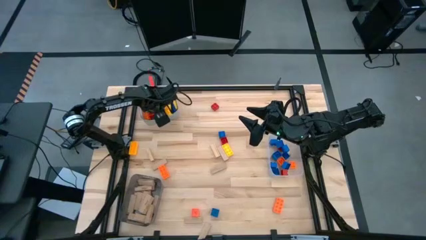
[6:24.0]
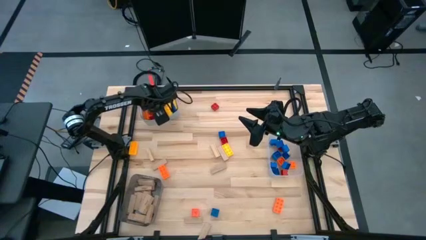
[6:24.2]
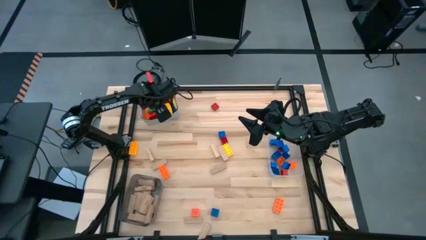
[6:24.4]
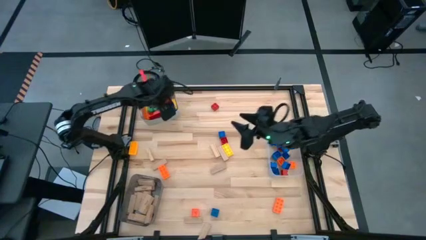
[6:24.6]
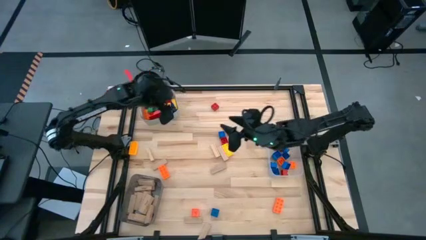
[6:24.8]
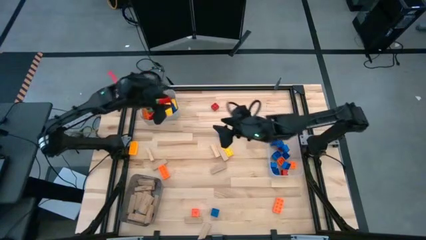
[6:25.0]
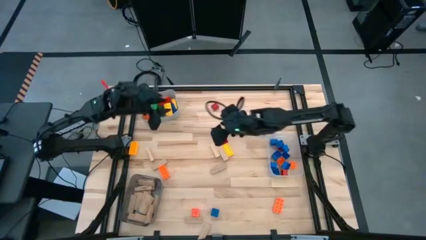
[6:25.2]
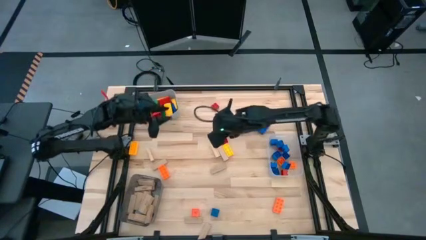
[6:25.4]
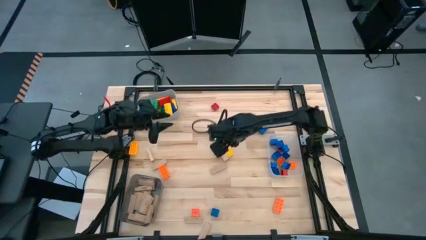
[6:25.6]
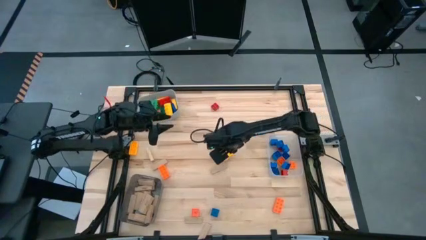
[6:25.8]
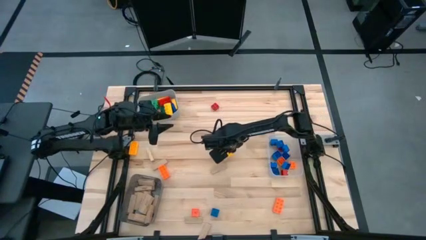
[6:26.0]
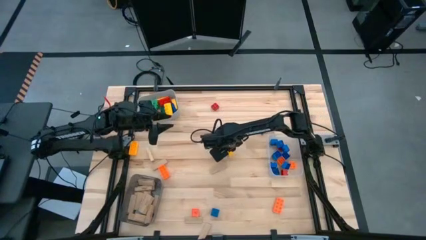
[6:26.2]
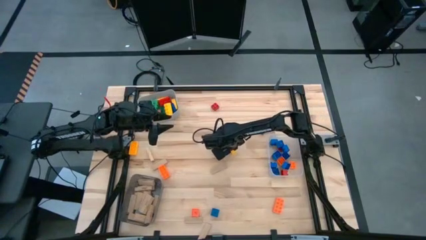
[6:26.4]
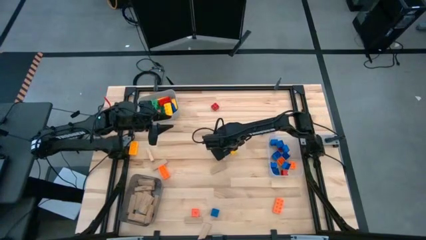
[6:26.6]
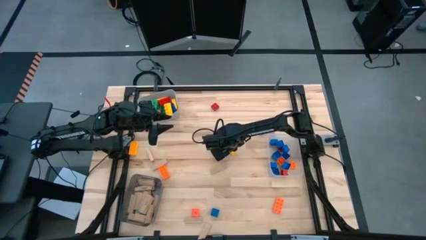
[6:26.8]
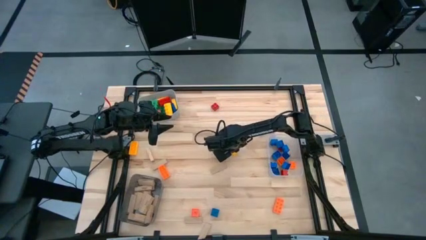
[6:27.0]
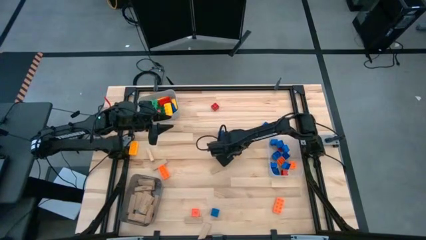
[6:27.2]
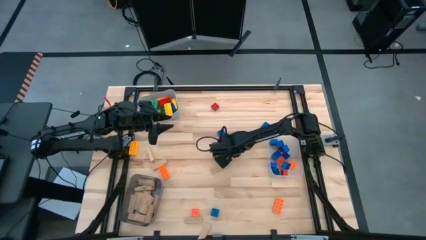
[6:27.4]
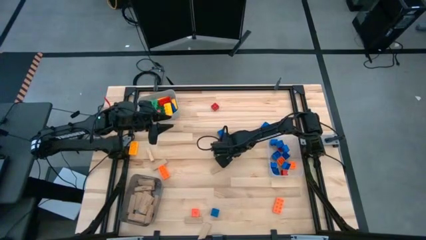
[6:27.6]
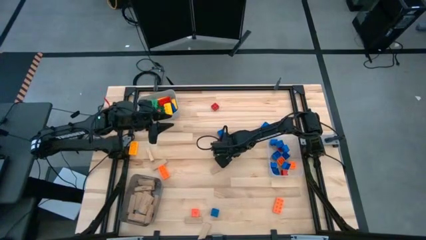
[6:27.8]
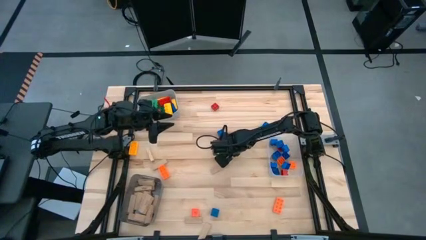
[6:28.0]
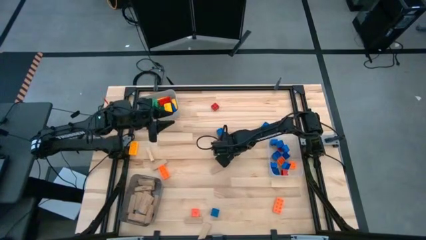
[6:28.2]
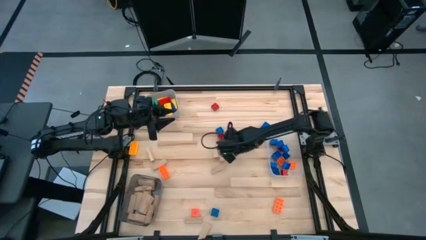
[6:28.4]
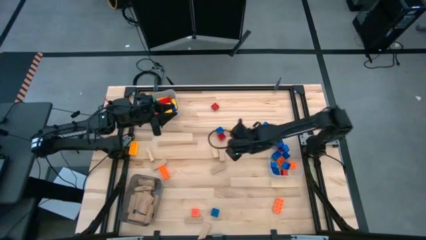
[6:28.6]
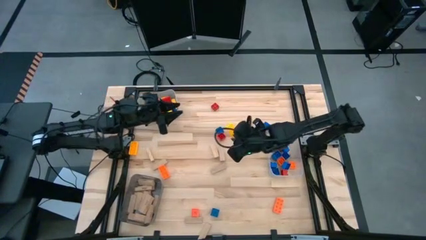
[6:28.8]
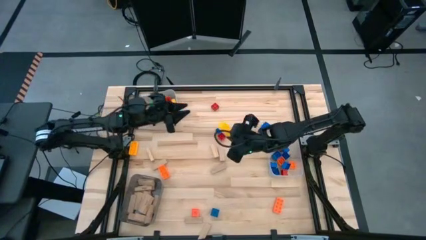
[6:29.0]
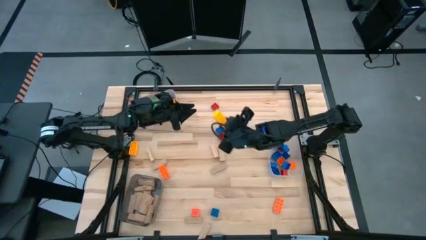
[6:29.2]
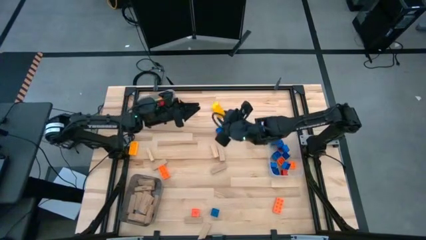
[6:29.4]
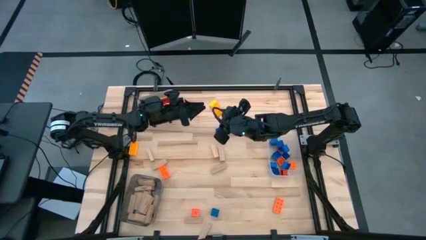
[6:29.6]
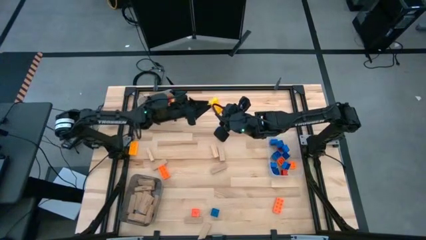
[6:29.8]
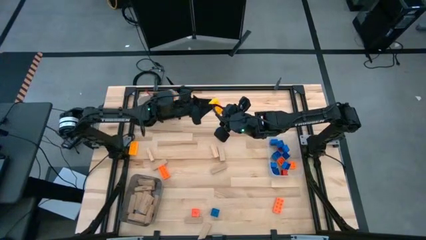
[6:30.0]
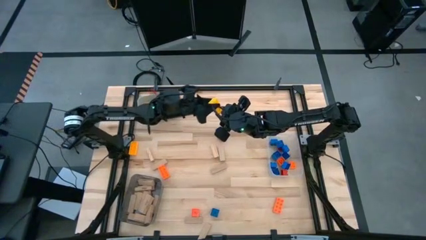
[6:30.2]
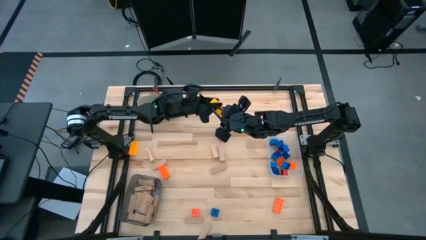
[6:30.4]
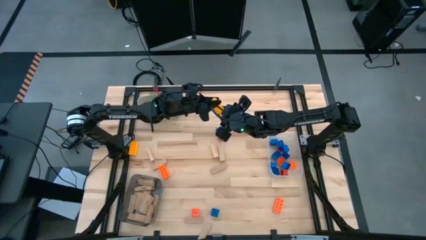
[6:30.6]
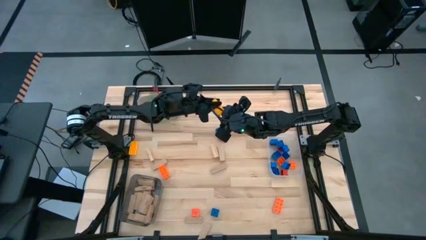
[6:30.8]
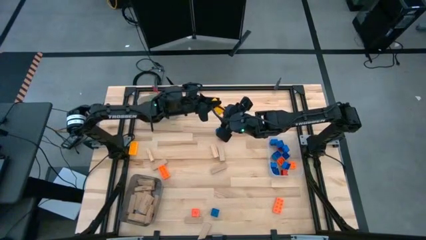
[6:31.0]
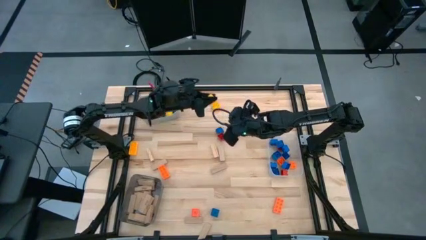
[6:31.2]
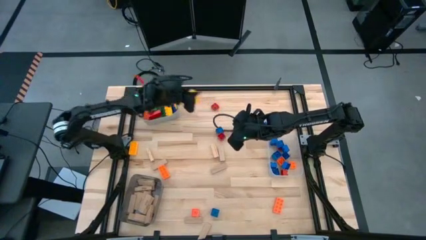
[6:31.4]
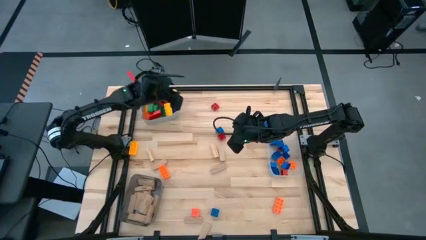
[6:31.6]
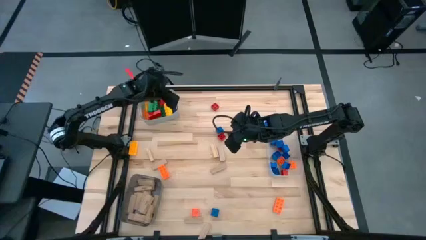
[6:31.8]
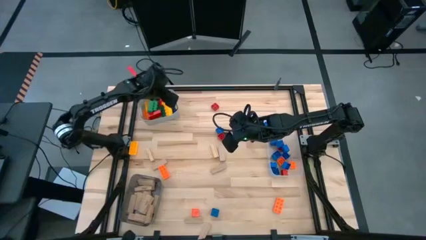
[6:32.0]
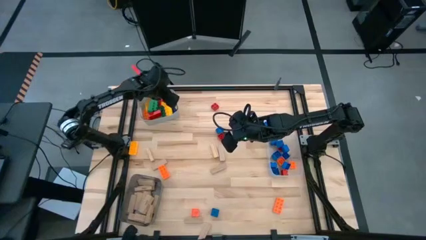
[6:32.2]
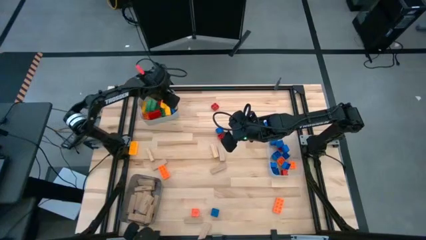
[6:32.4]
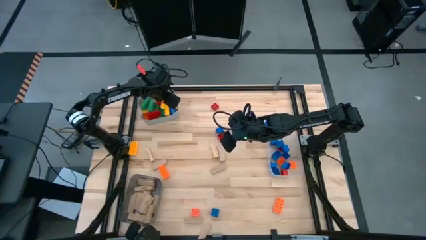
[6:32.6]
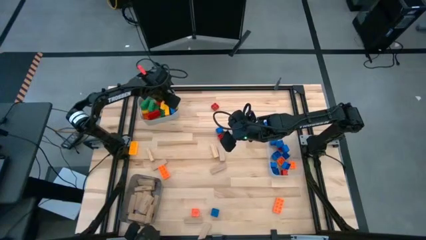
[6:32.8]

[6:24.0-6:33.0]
Task: Sort blocks by size
Put the large yellow game piece into the gray bin

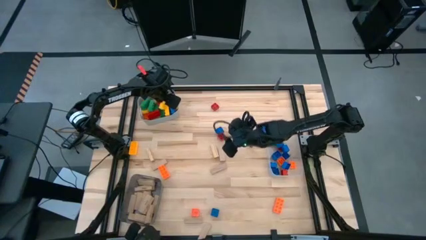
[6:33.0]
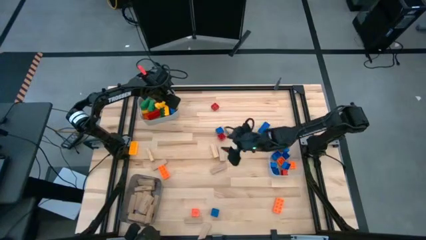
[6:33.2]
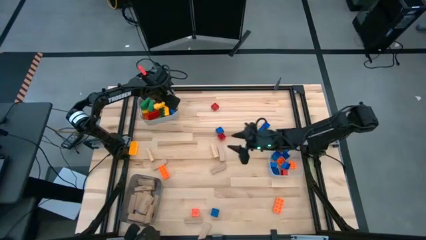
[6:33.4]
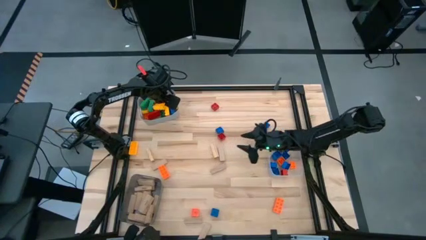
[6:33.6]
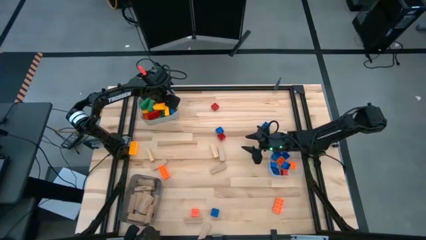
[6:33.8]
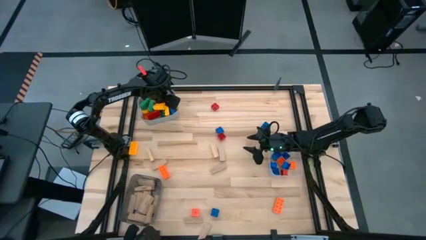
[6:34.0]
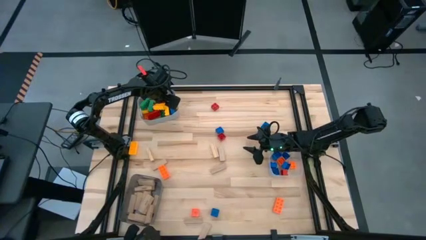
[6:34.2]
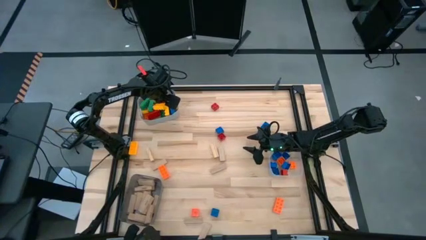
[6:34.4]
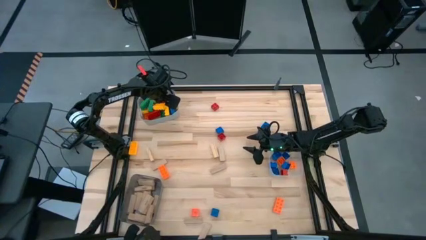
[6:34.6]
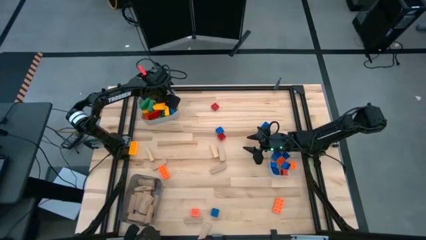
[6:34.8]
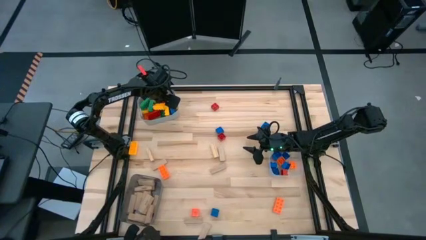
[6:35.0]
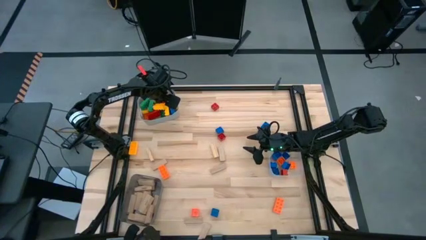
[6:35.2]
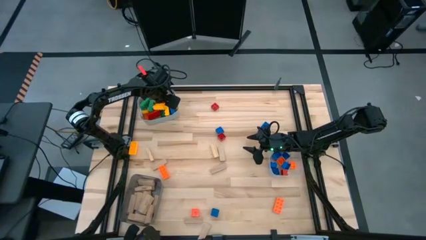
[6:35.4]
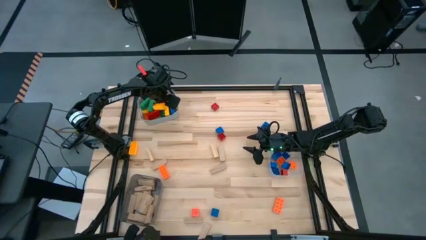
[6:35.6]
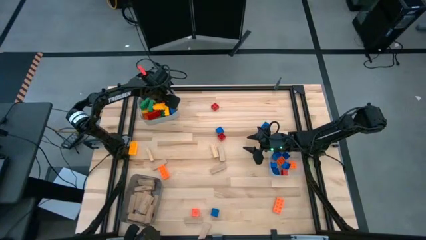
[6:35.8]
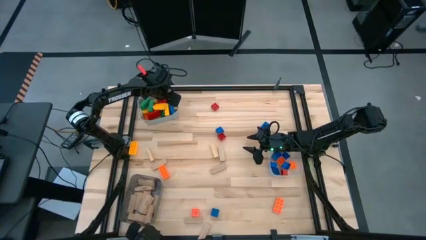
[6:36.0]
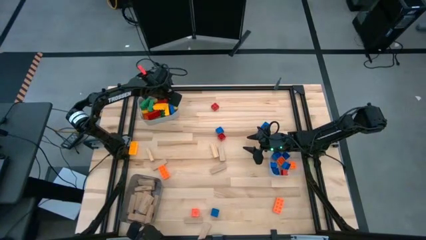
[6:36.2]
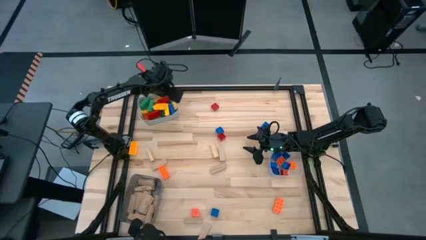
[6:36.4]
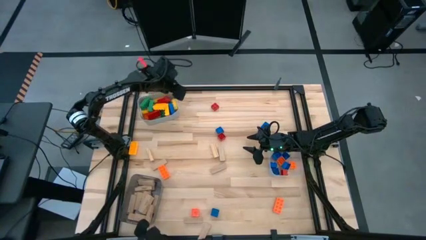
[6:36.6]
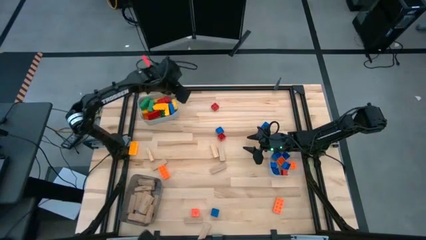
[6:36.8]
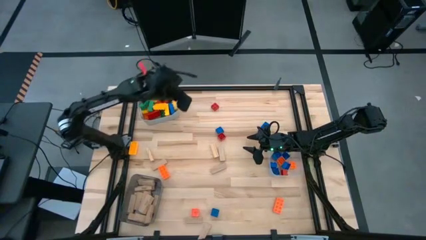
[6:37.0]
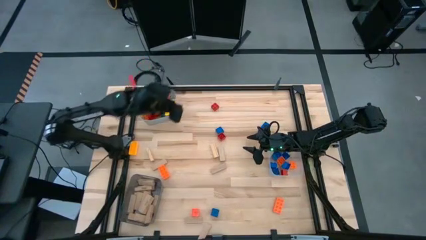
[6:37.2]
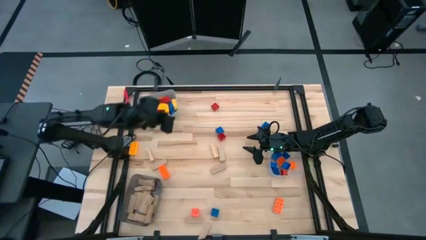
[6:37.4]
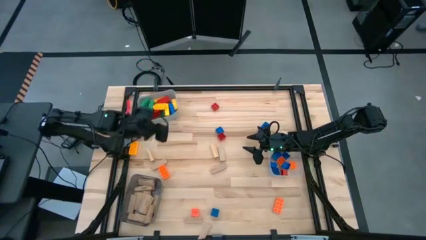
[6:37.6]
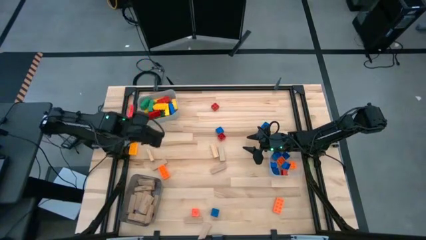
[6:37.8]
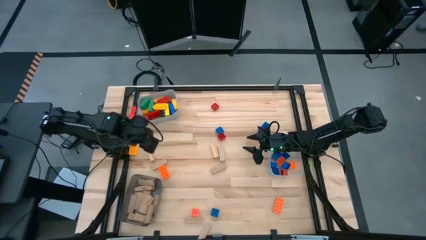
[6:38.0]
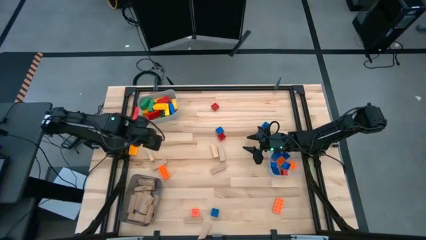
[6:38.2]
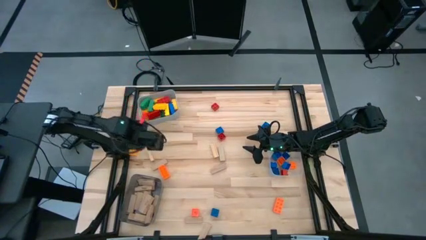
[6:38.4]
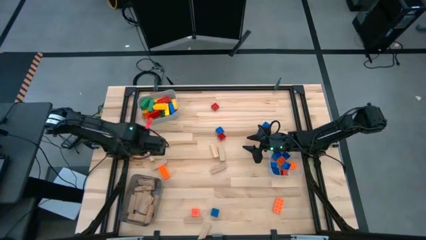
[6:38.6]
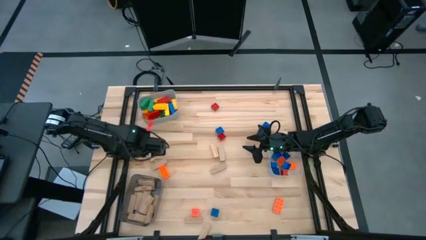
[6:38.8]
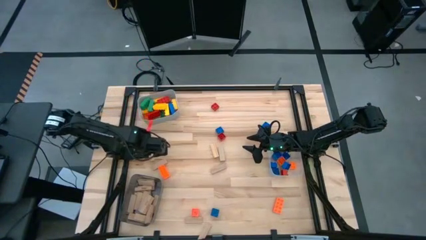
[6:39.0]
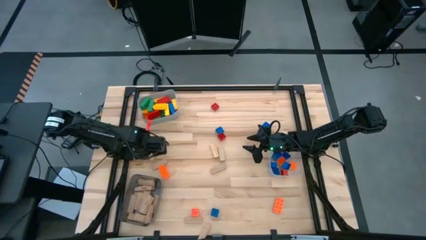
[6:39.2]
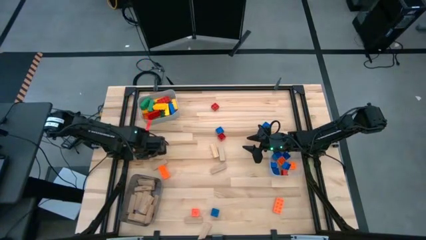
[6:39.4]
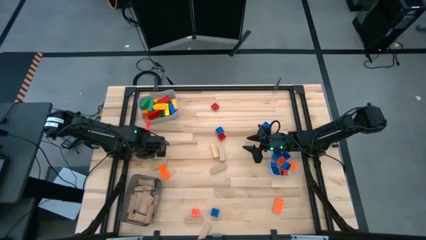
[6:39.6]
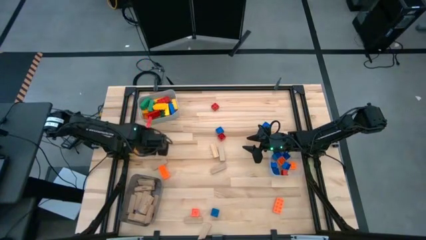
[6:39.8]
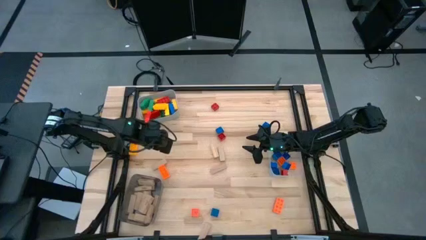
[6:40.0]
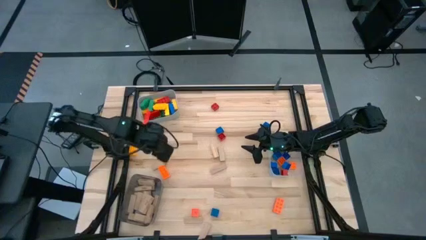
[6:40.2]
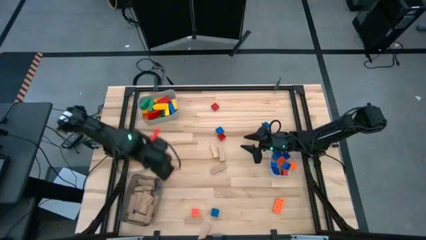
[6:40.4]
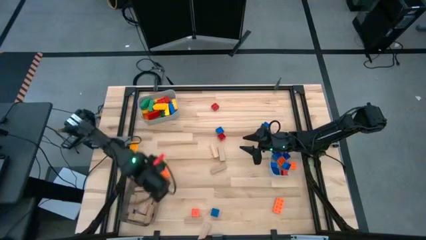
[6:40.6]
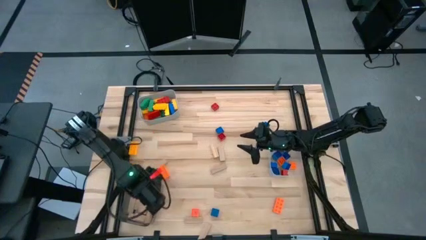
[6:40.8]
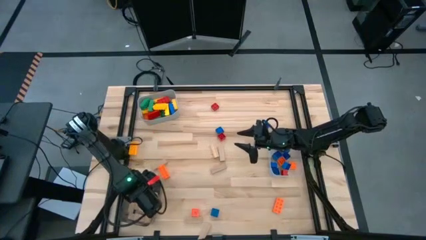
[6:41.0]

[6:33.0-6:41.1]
Put the brown block into the black bin
